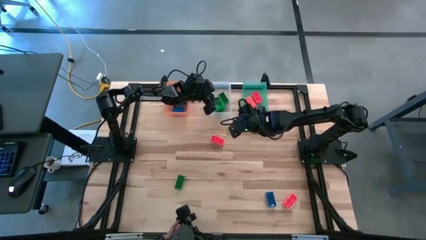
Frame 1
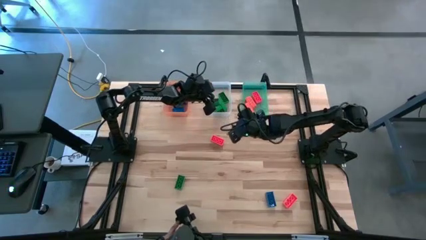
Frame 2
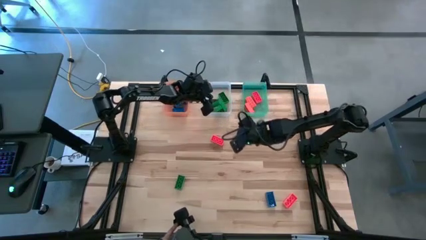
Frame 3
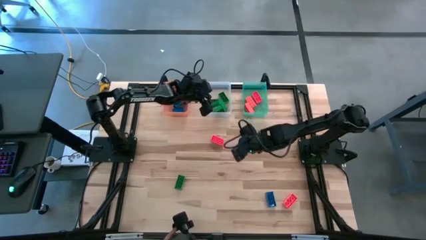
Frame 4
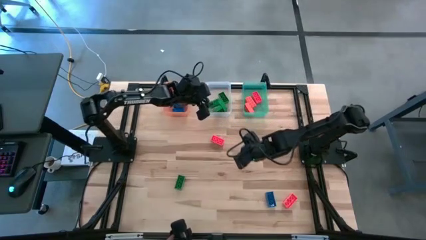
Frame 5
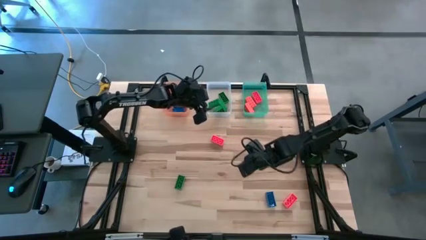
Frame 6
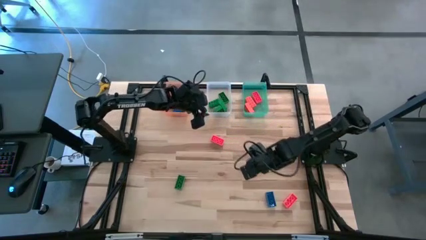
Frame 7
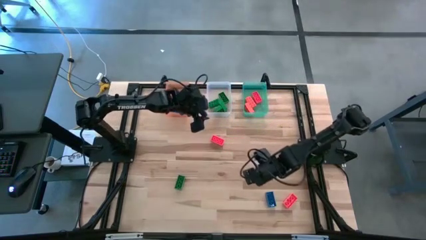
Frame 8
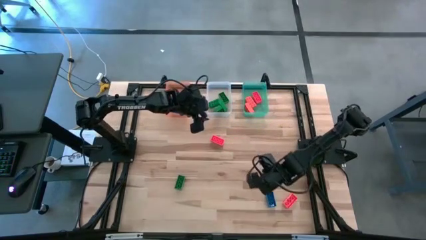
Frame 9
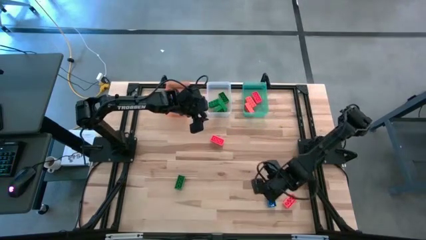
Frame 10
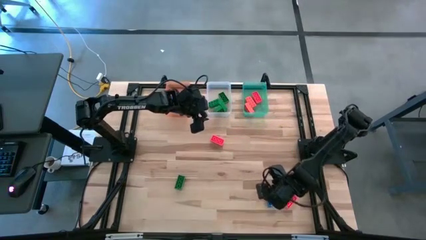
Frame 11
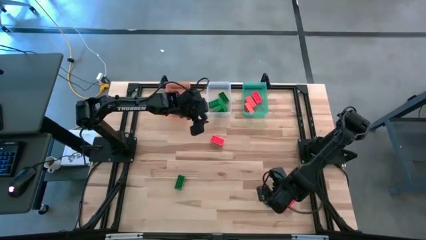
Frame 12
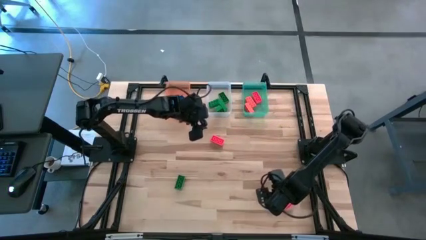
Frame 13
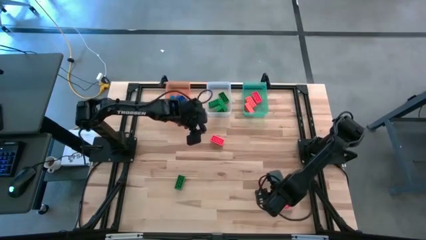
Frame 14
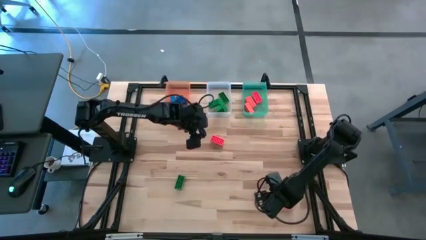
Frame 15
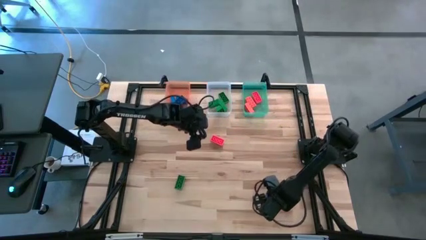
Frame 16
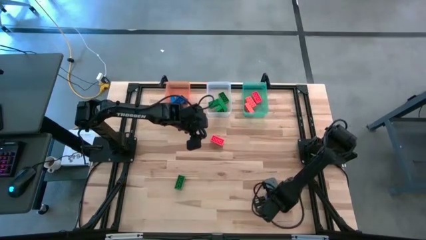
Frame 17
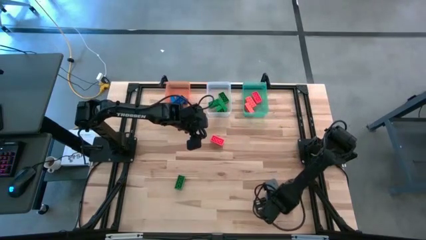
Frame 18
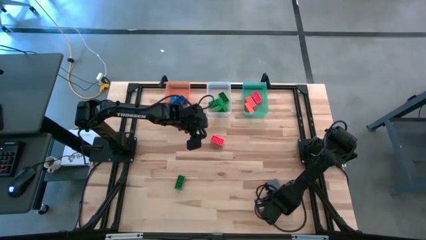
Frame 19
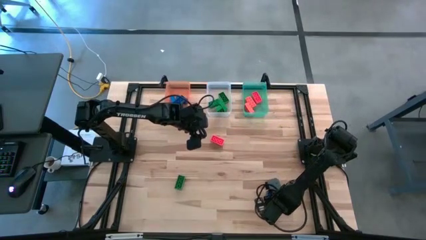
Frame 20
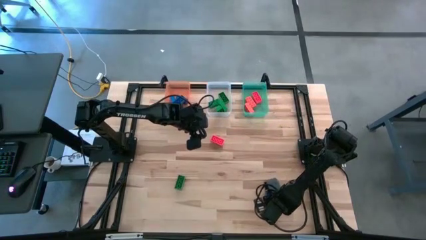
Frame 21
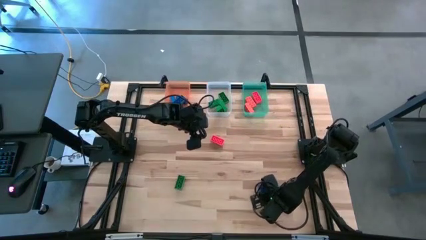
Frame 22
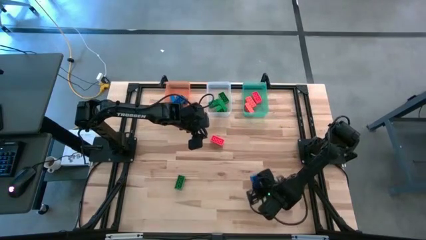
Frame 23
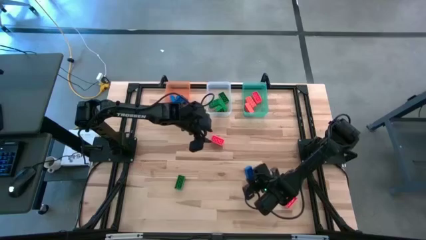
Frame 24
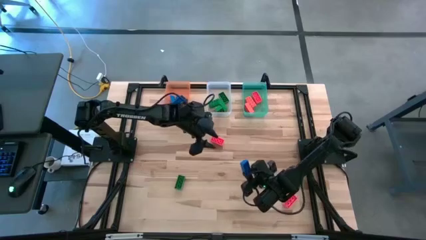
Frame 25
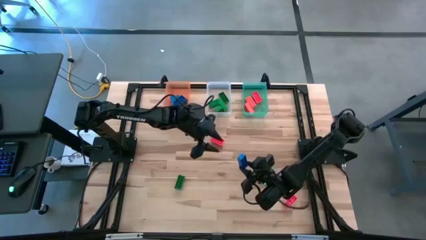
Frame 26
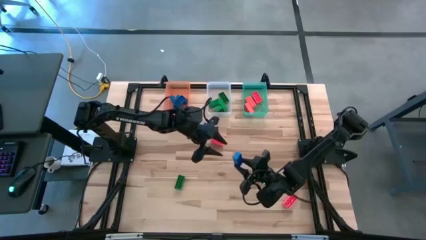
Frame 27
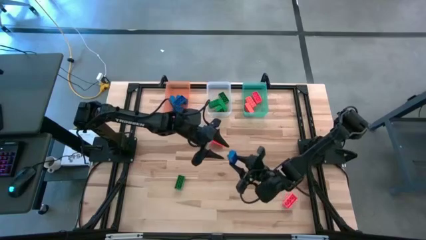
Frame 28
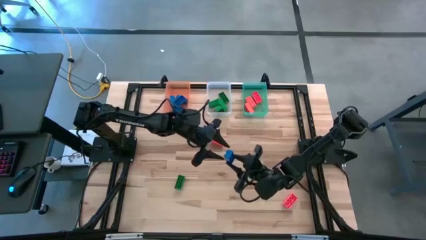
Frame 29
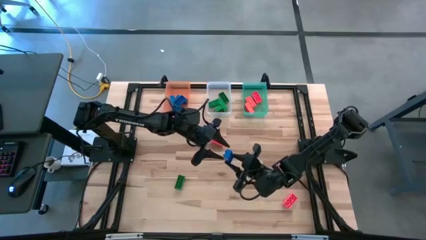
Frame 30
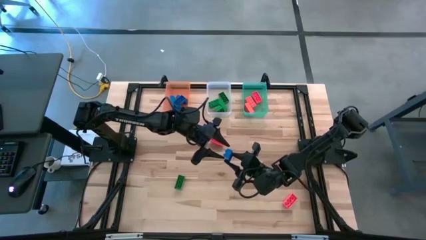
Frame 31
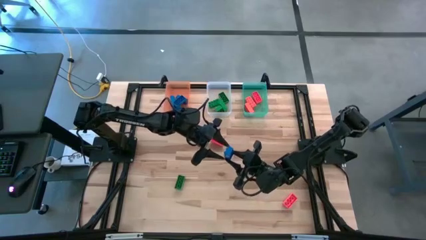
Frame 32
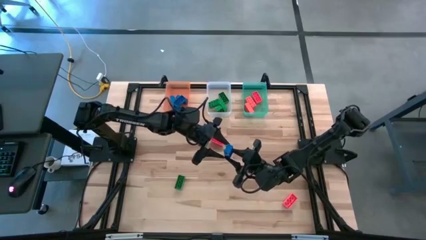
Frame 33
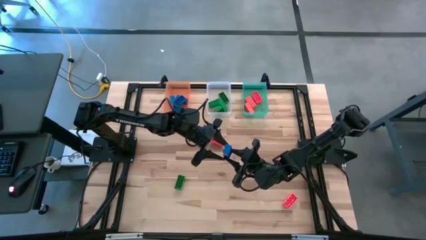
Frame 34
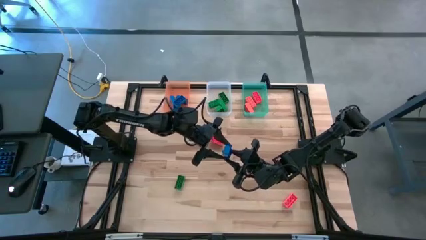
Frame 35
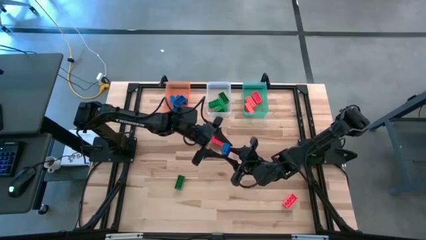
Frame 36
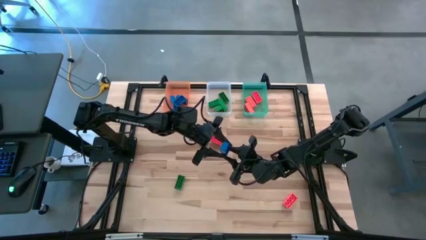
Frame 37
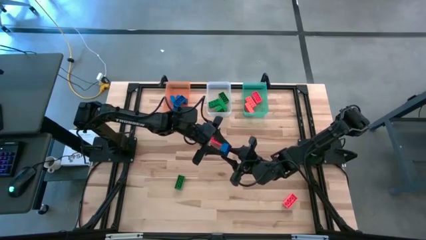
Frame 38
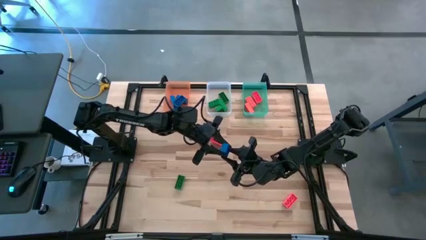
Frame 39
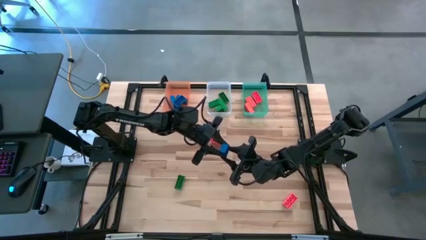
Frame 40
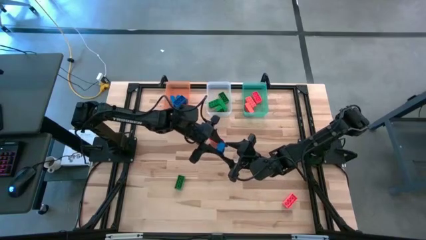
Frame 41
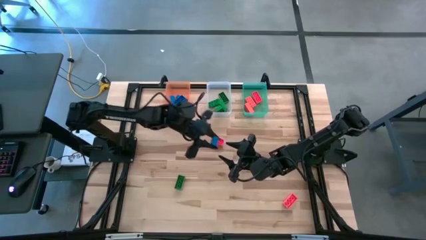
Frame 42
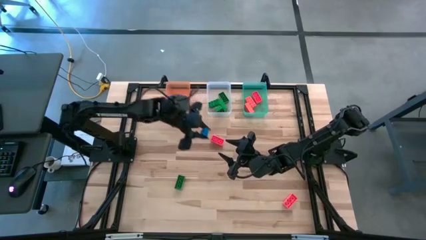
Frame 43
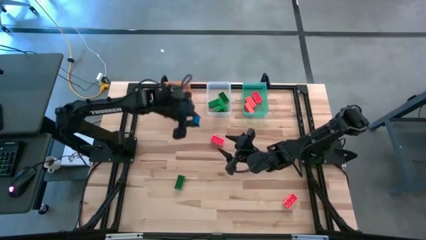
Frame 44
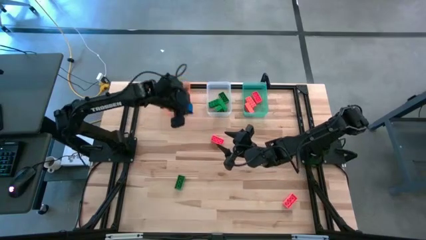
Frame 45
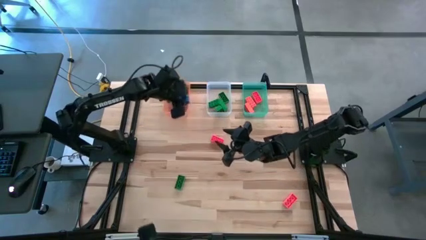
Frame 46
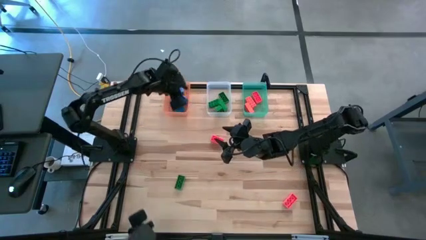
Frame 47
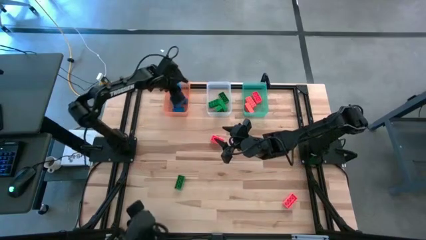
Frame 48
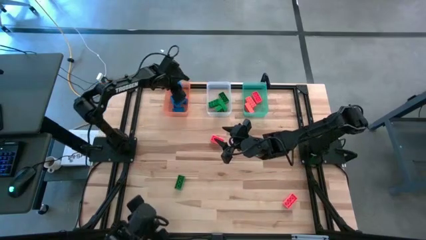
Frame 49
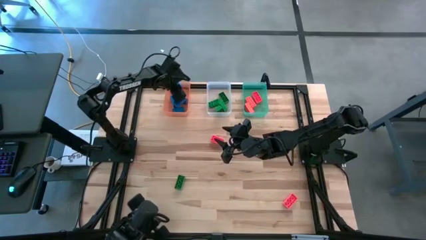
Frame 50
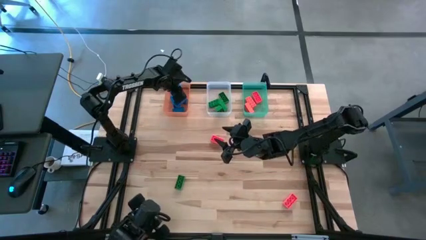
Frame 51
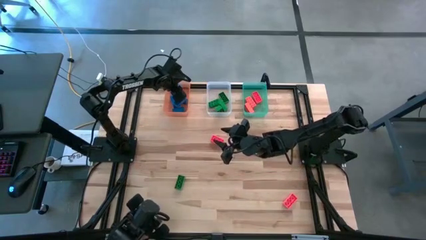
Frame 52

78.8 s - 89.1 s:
Task: Sort & place blocks by color
Put the blue game piece into the bin

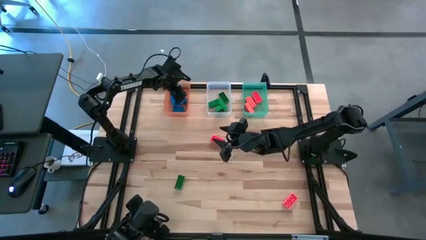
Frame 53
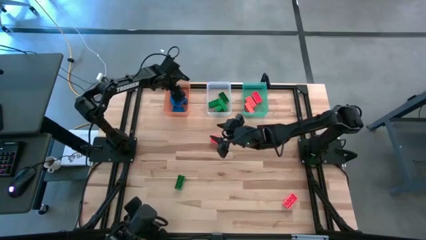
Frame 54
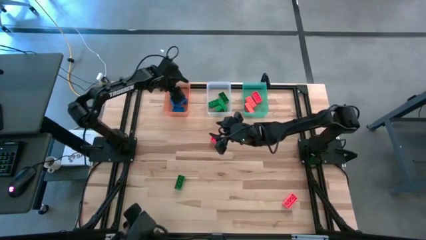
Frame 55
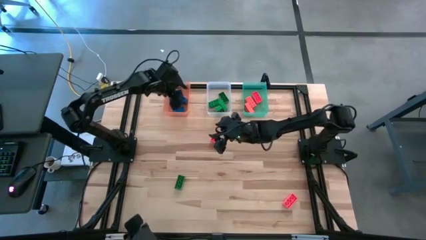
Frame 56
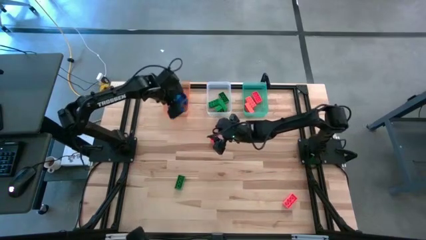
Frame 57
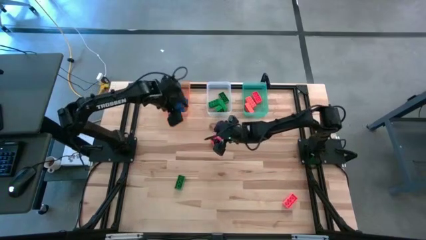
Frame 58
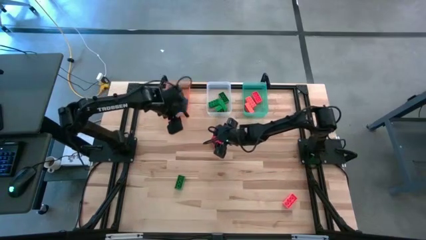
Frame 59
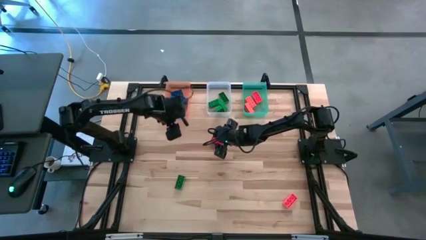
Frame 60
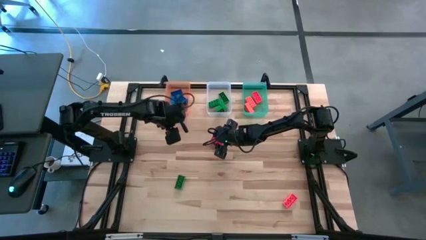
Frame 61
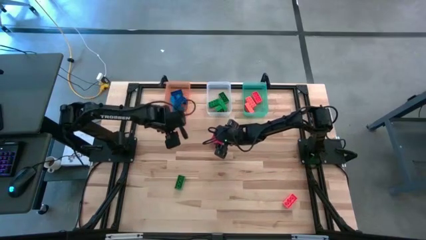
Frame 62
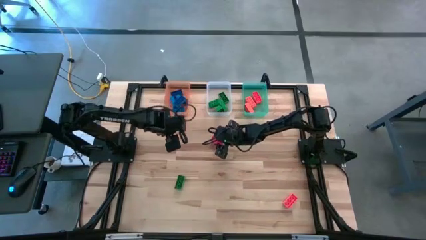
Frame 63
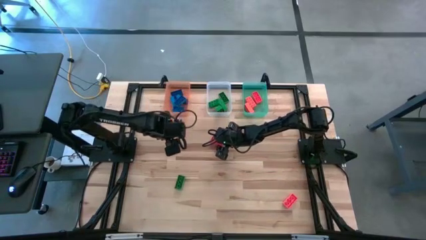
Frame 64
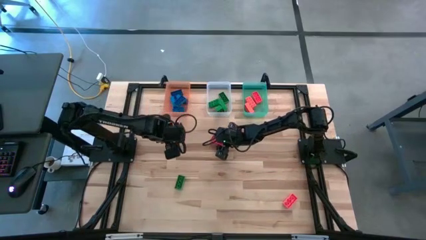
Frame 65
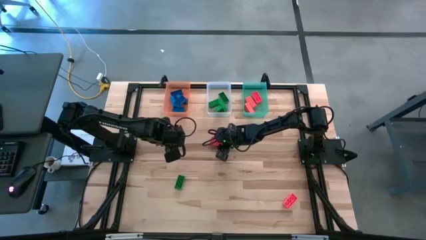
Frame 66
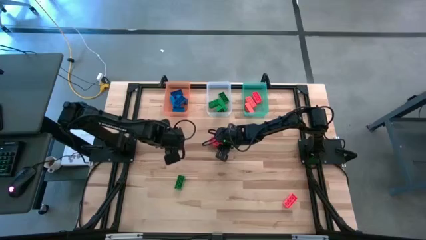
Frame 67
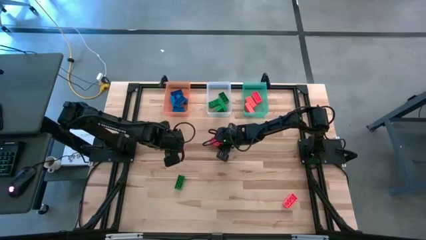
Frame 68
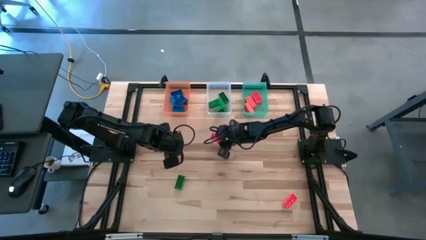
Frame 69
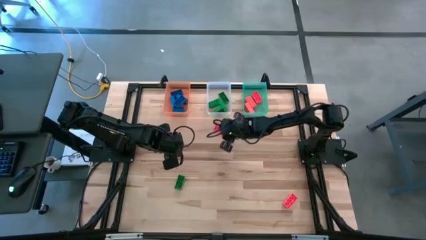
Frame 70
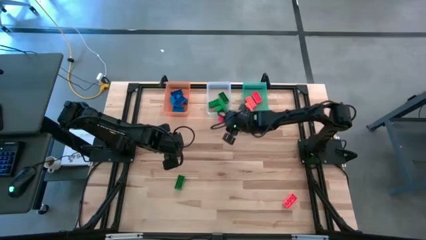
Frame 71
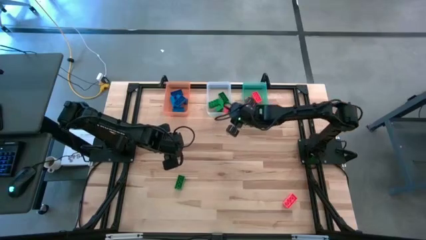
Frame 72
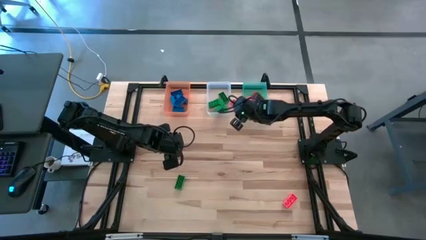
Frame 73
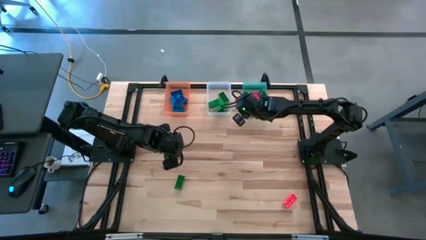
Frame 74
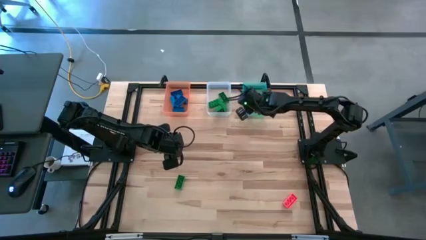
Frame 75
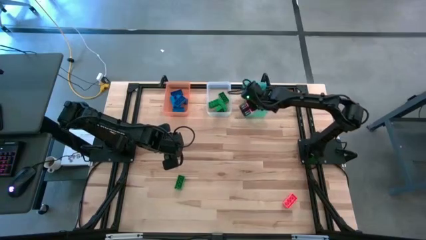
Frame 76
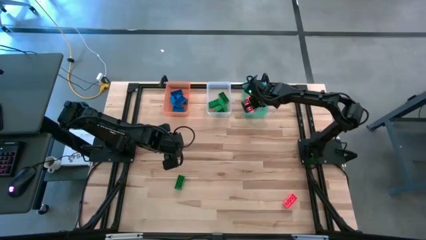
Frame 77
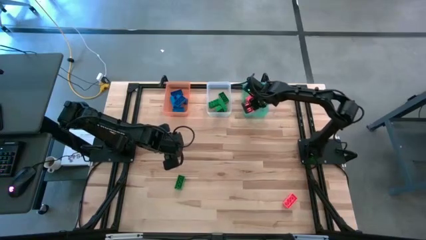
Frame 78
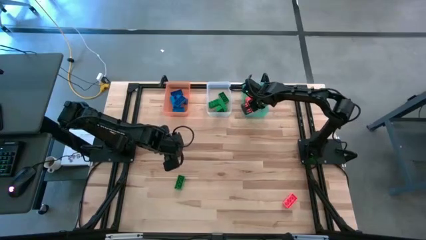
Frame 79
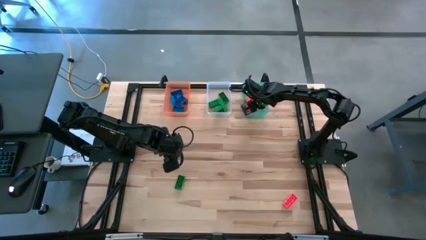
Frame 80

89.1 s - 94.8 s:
Put the orange game piece into the bin
